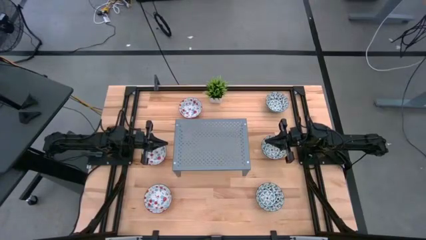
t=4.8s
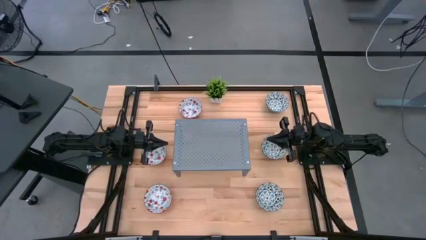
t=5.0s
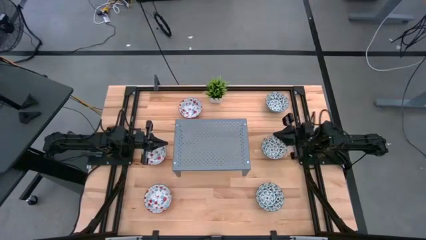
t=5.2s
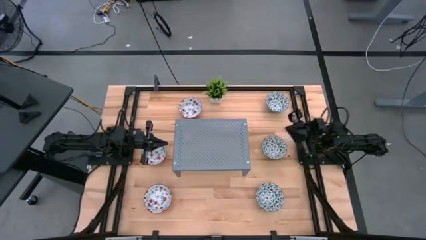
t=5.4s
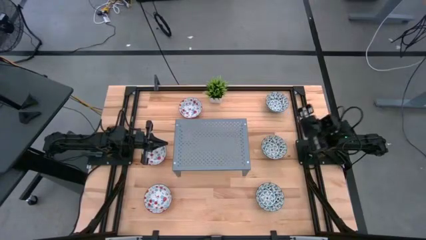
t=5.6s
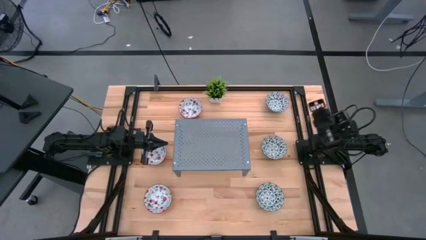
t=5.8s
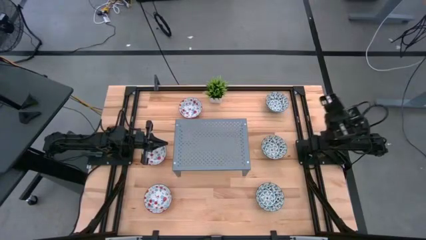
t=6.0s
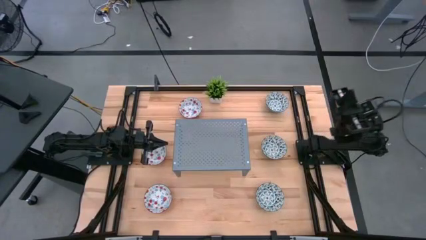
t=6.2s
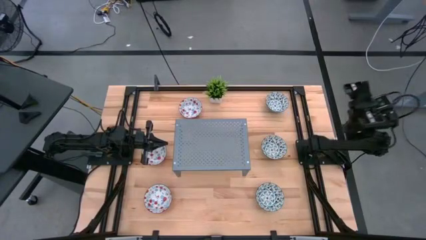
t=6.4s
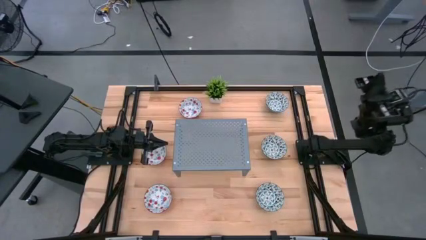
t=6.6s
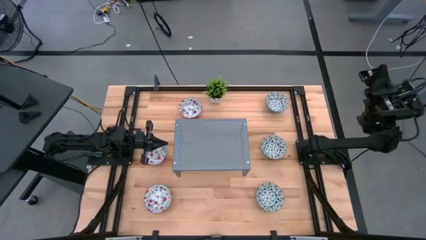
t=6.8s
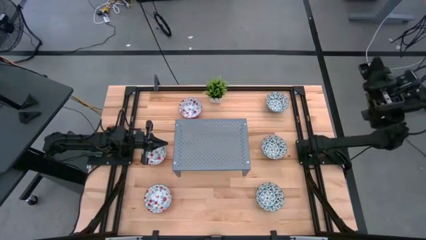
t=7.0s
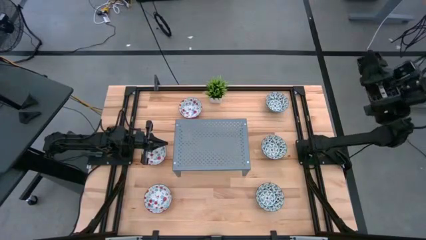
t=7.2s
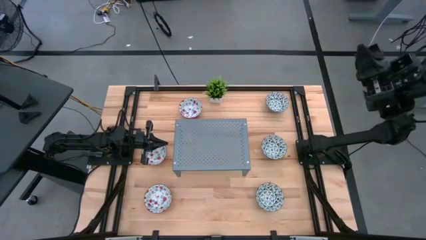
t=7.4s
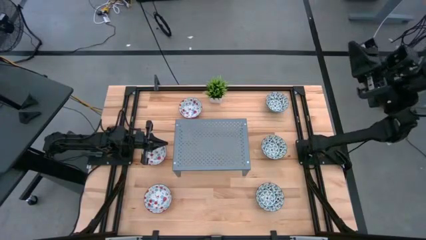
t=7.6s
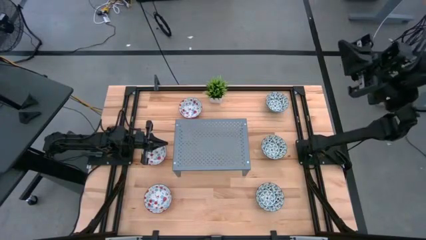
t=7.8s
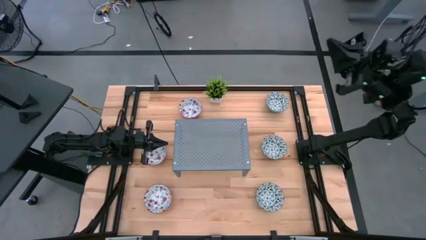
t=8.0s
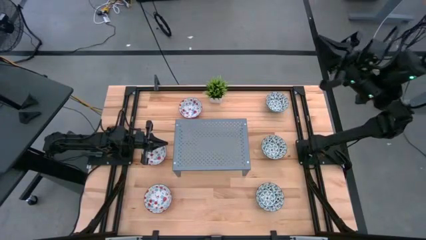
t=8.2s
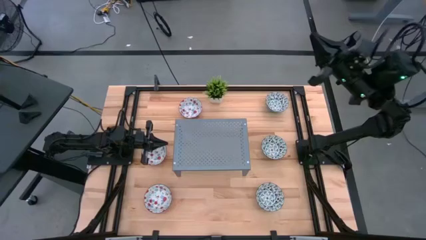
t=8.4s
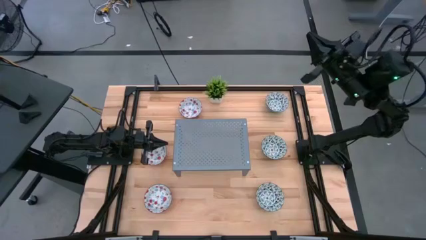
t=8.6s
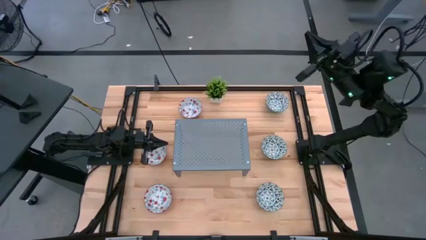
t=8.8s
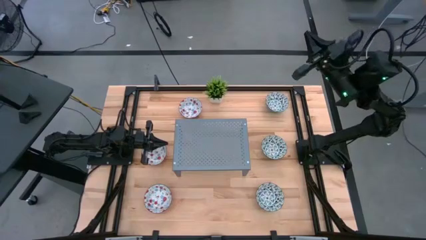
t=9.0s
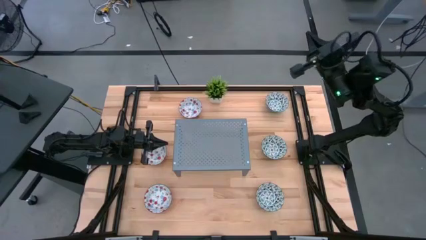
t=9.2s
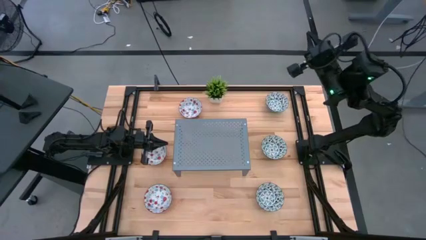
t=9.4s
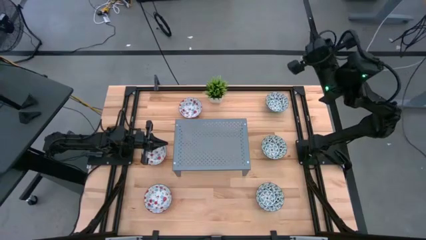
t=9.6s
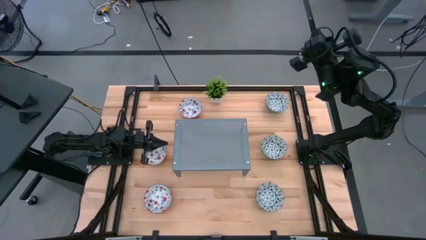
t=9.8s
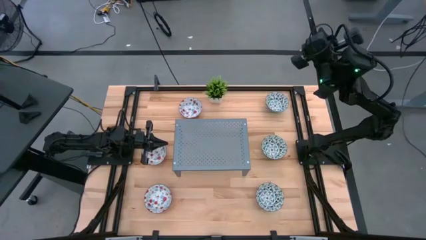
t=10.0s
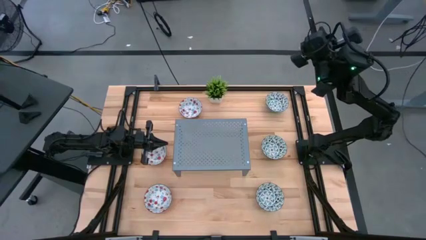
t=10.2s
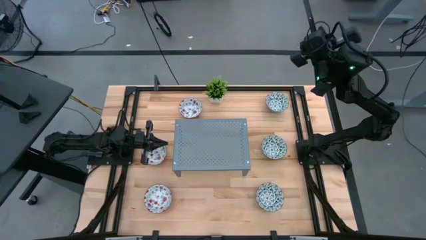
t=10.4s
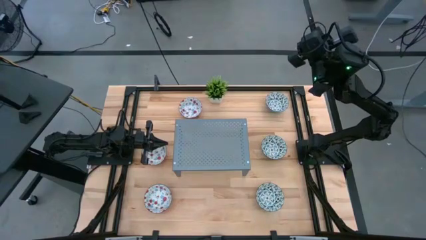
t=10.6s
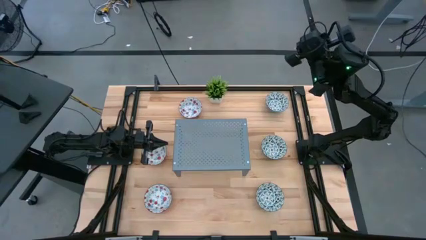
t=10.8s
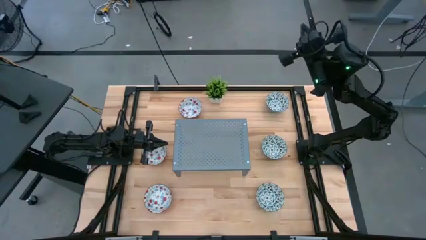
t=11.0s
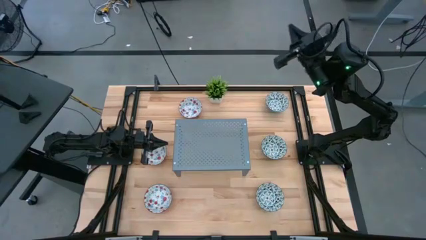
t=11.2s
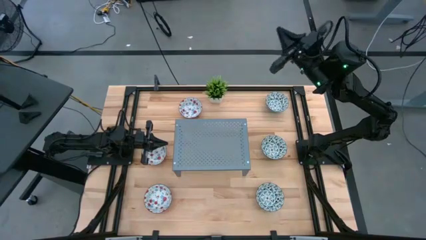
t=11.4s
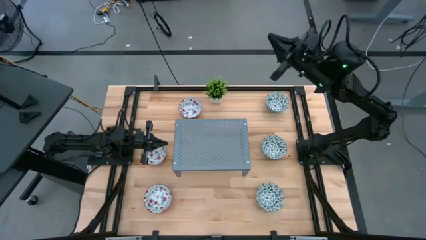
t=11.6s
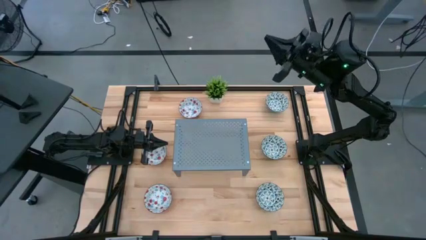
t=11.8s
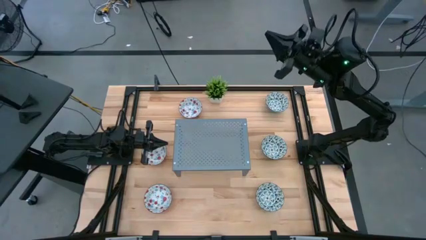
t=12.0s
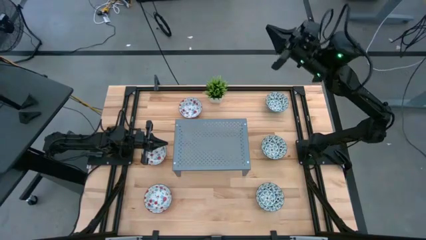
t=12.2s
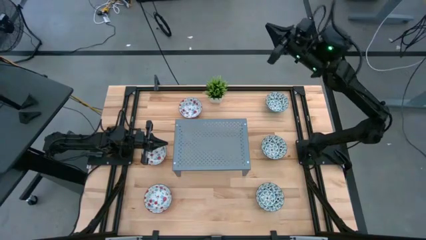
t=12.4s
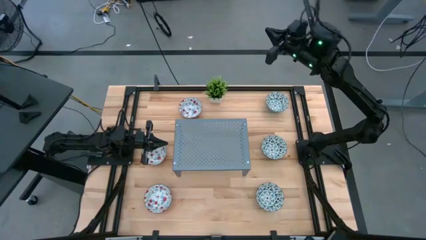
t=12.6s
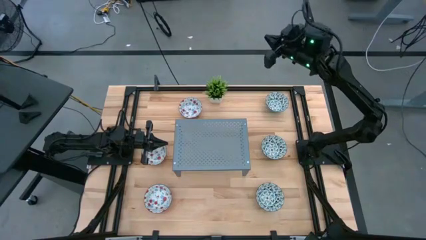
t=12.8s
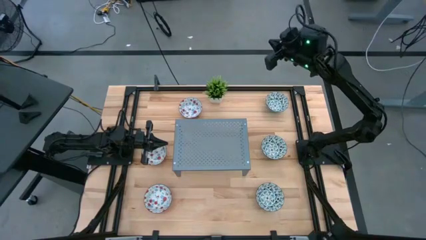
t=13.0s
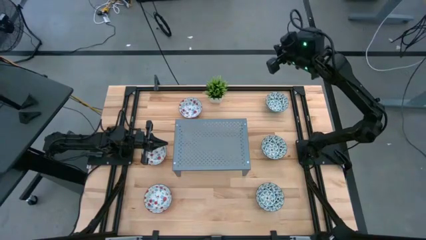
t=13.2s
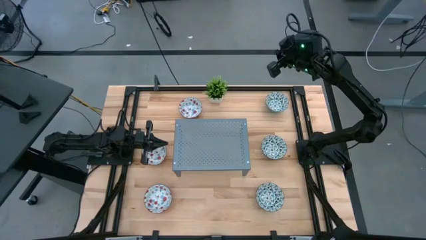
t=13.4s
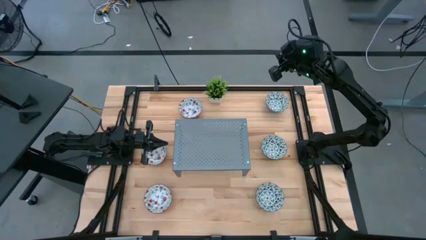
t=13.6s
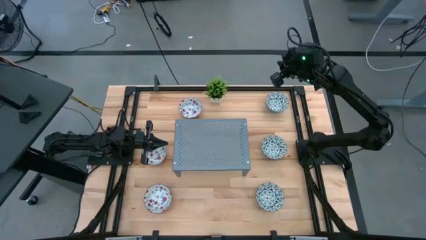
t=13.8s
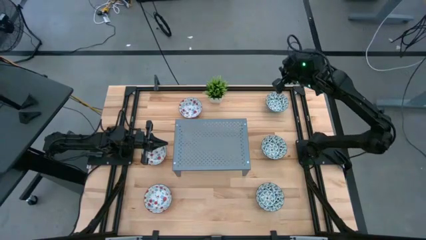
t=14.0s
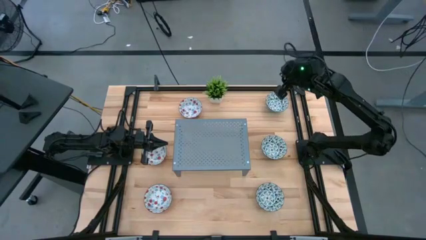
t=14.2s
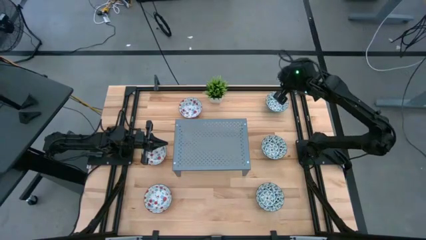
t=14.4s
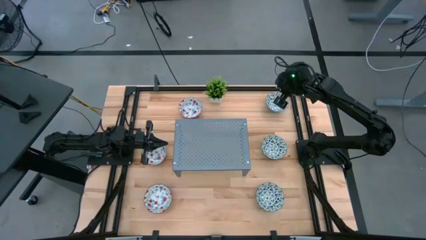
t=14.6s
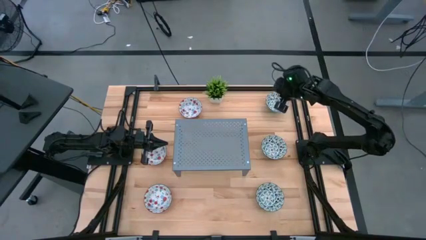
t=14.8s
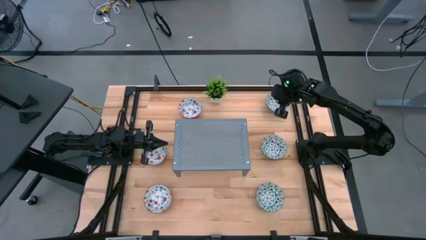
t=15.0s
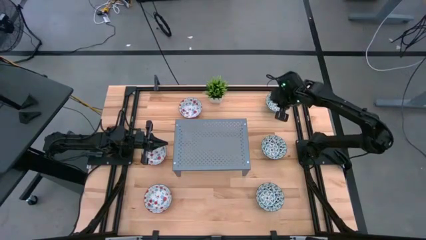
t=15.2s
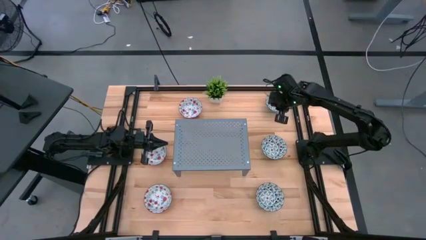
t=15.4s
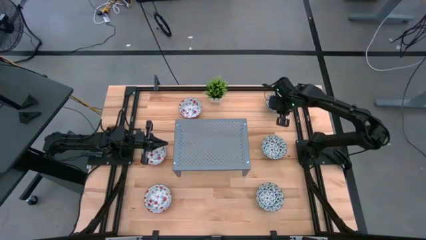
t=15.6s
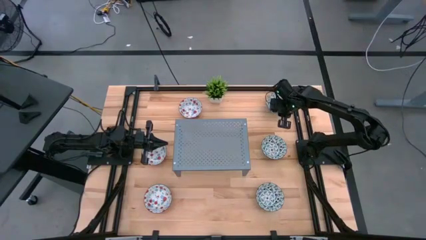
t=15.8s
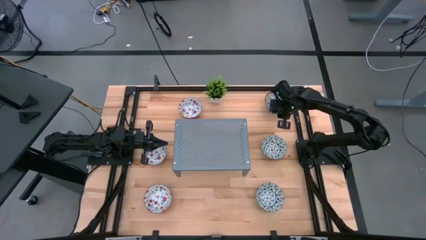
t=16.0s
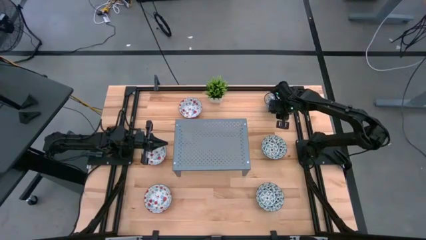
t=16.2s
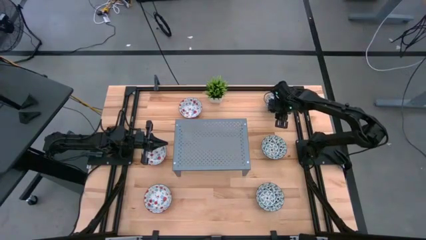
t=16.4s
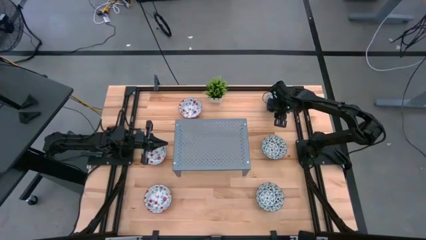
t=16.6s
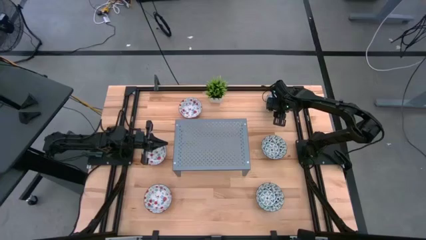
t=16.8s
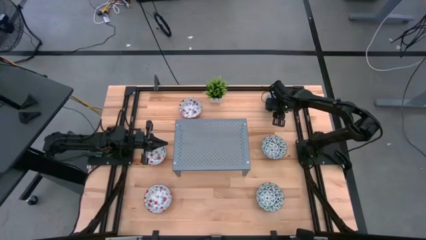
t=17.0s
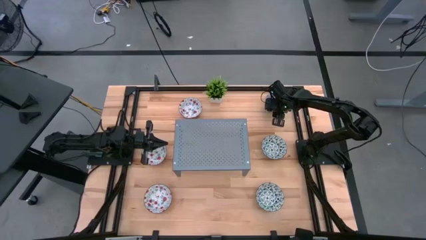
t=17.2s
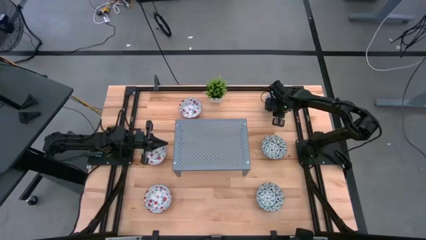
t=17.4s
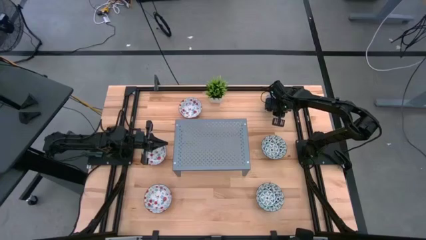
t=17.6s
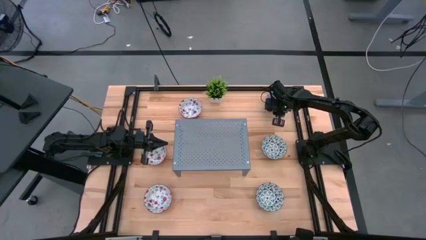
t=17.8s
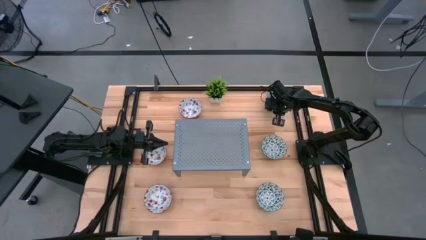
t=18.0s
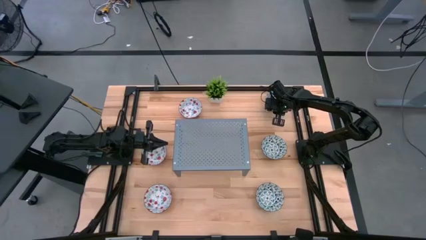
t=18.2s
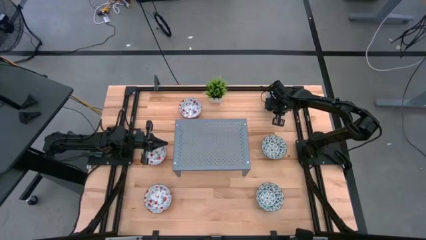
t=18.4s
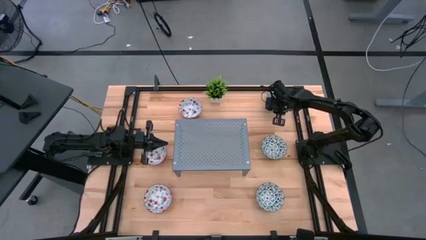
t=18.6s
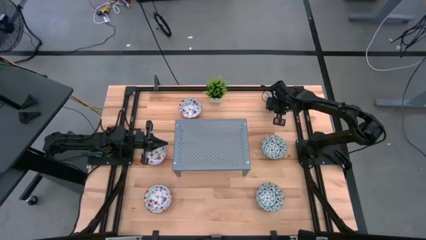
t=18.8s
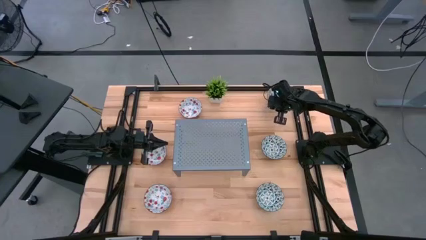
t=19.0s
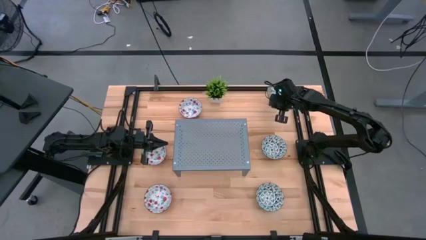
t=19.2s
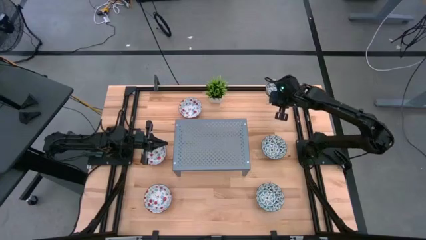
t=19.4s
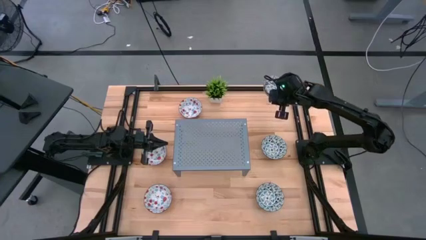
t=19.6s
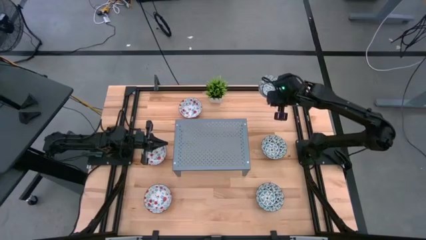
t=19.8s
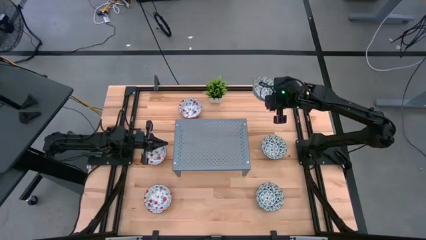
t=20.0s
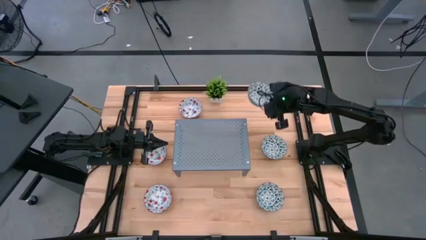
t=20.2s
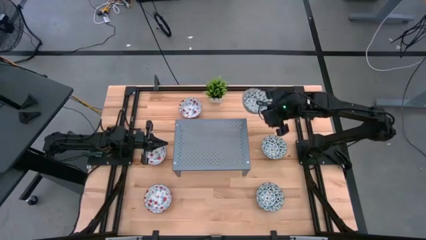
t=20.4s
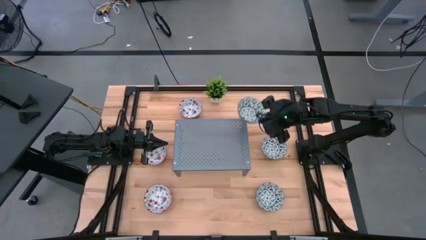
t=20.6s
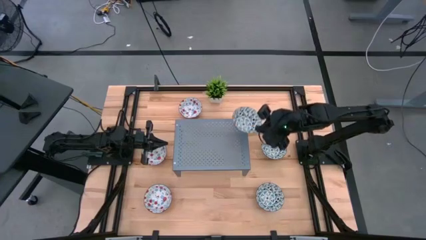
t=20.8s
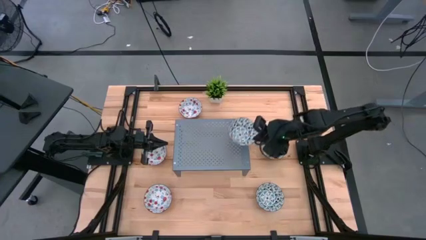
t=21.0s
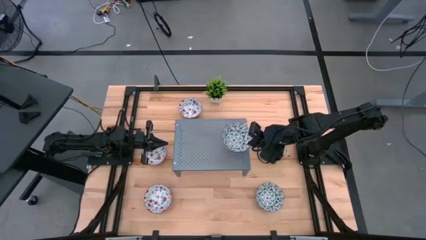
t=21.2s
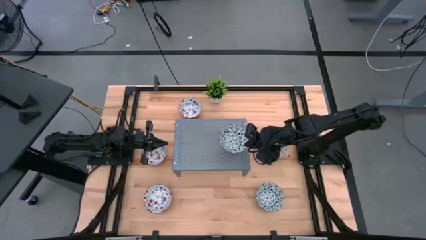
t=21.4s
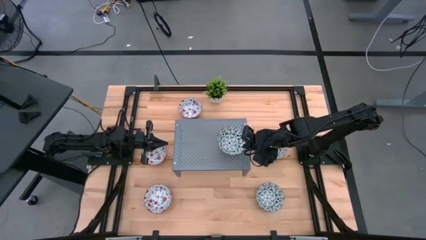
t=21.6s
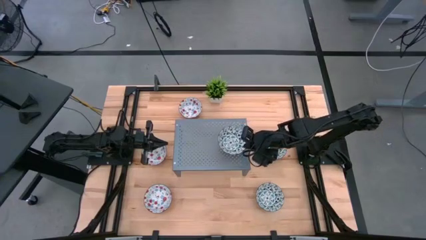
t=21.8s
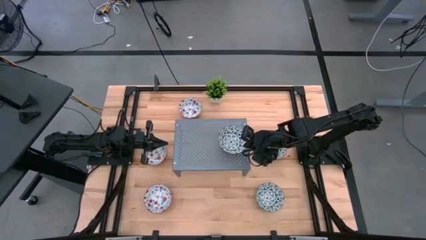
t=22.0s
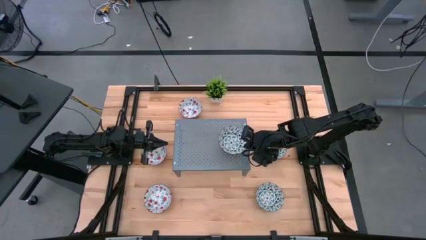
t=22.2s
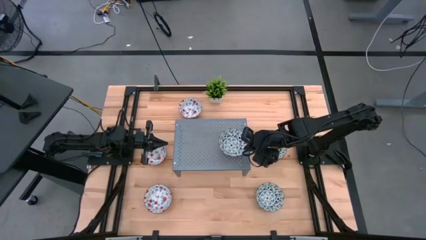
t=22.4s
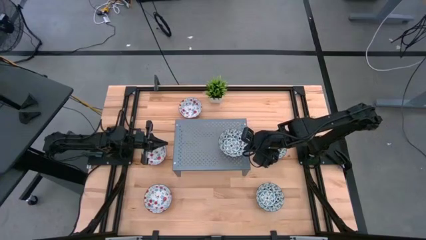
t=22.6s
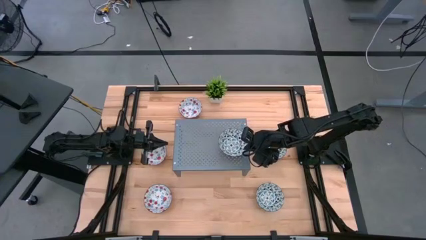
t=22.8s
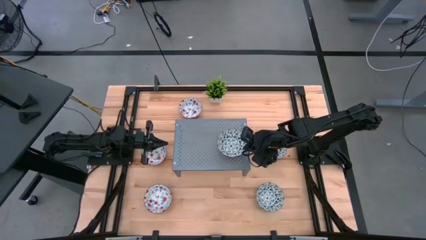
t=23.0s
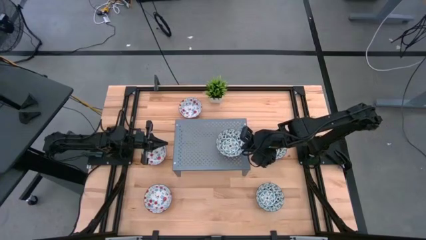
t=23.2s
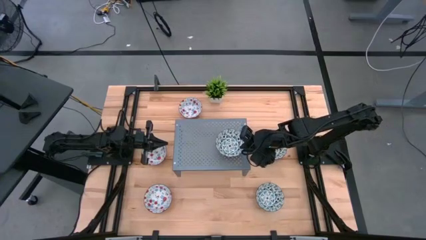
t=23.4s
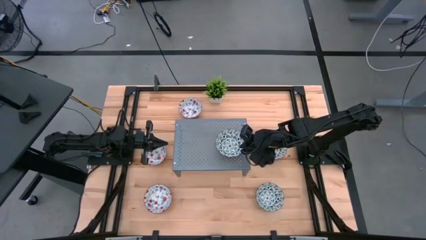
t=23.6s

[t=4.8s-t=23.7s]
Task: Pick & Place Mini bowls
Put the top blue patterned bowl on the shelf
